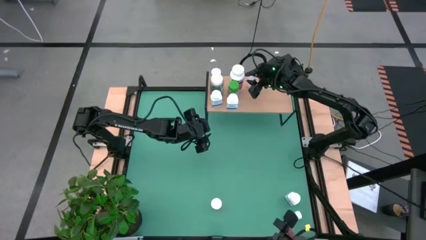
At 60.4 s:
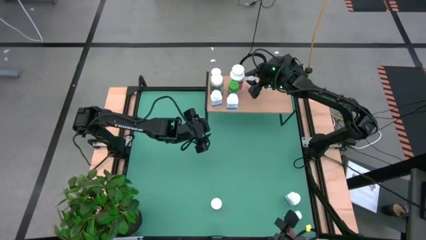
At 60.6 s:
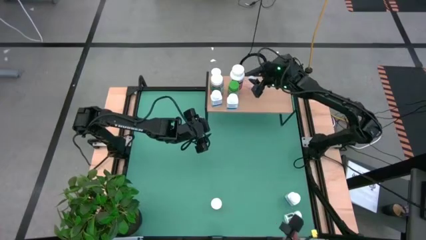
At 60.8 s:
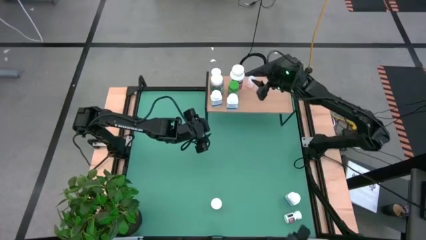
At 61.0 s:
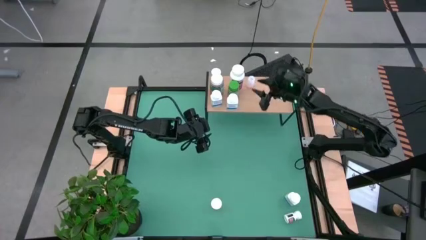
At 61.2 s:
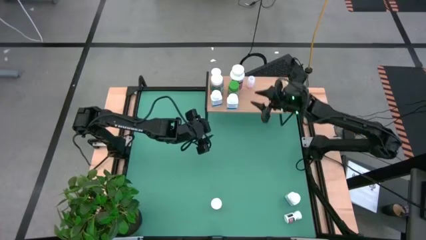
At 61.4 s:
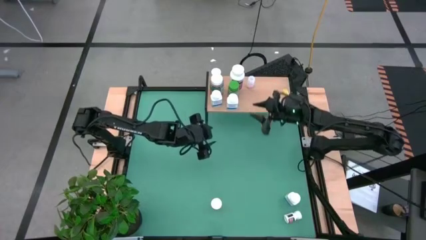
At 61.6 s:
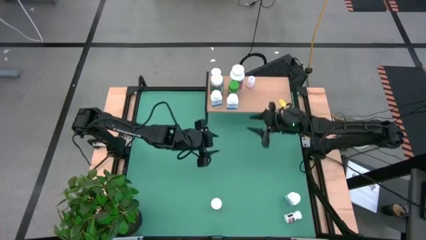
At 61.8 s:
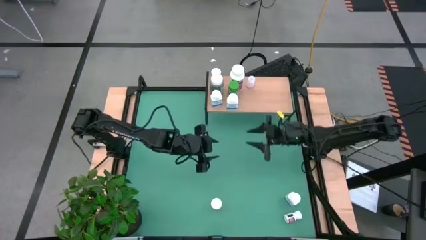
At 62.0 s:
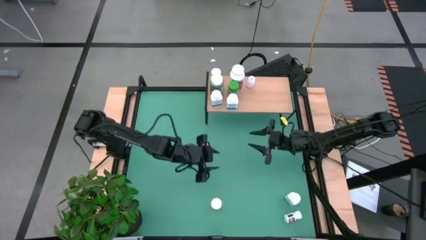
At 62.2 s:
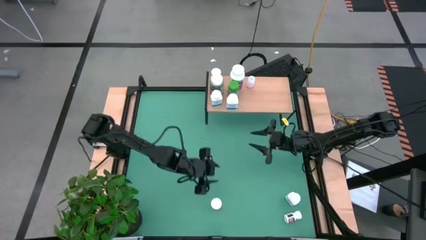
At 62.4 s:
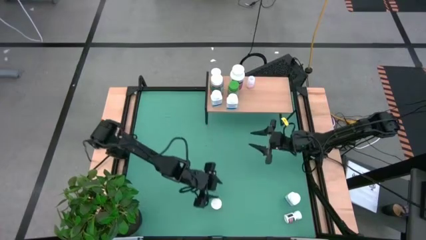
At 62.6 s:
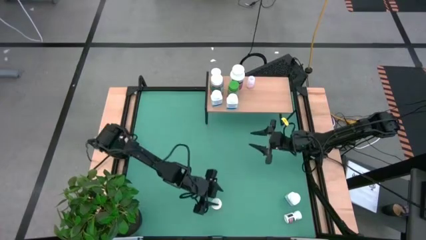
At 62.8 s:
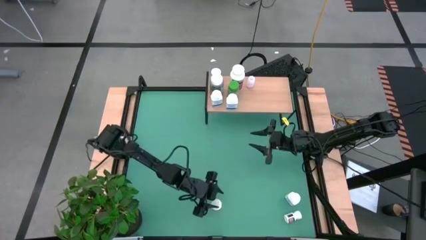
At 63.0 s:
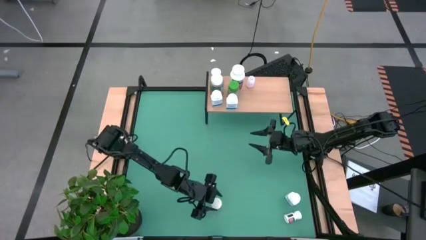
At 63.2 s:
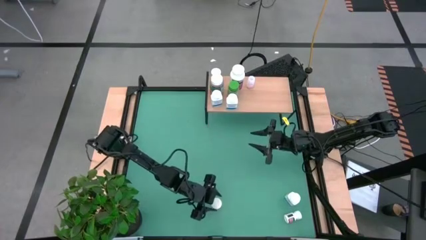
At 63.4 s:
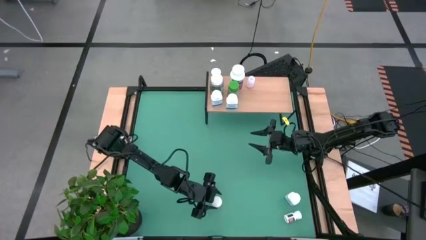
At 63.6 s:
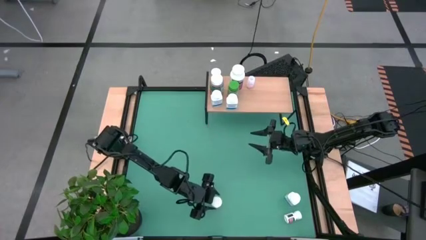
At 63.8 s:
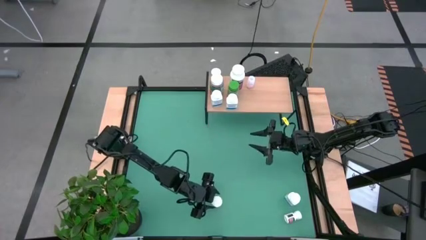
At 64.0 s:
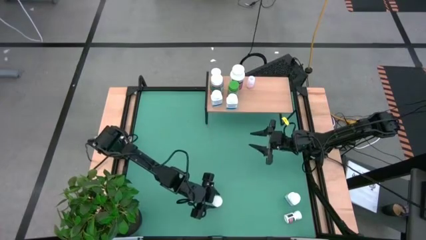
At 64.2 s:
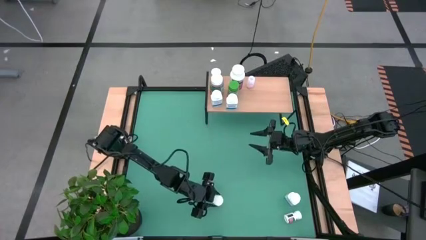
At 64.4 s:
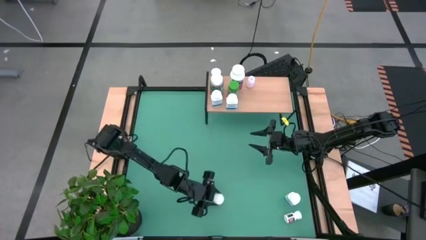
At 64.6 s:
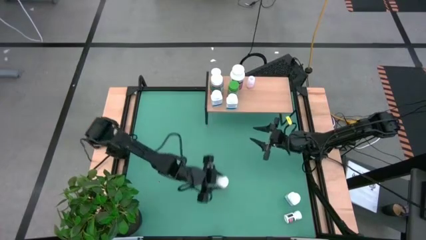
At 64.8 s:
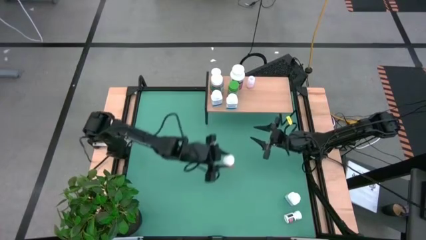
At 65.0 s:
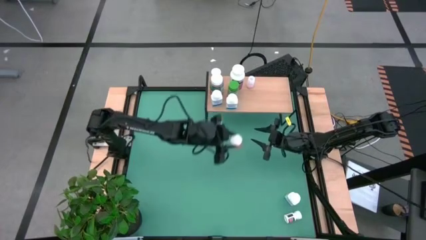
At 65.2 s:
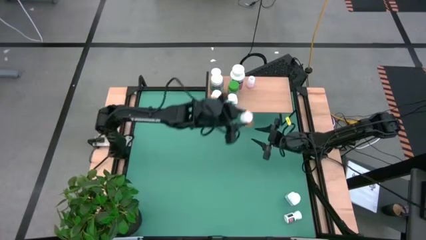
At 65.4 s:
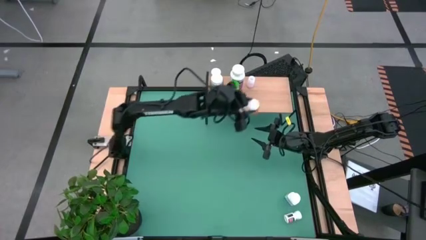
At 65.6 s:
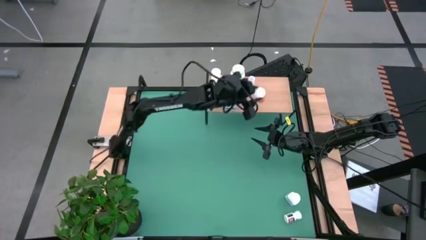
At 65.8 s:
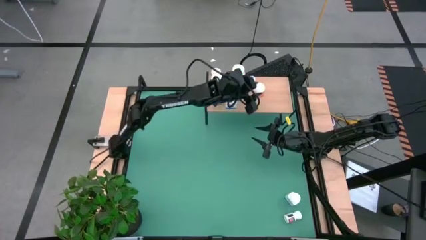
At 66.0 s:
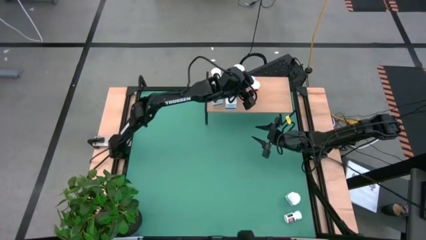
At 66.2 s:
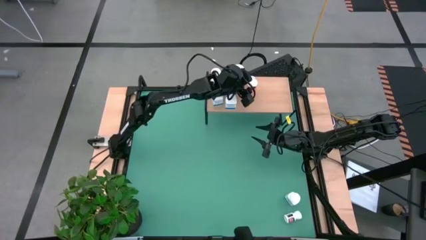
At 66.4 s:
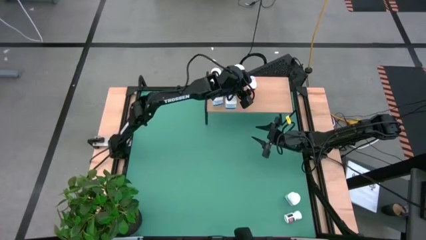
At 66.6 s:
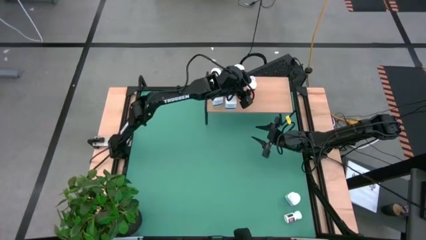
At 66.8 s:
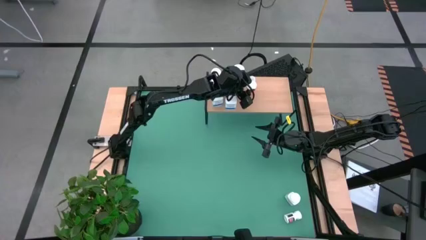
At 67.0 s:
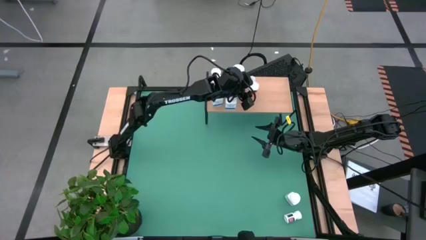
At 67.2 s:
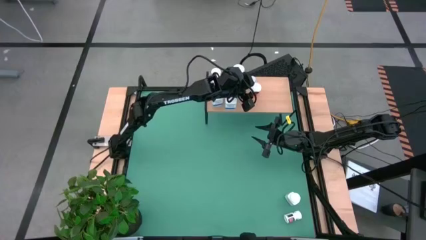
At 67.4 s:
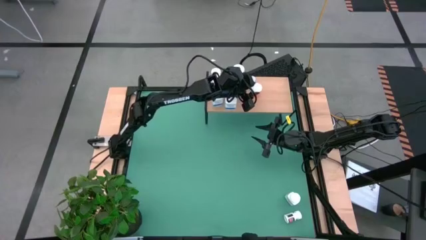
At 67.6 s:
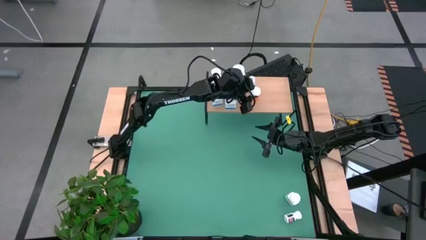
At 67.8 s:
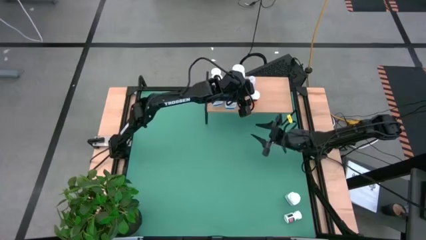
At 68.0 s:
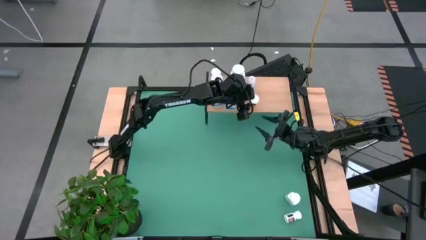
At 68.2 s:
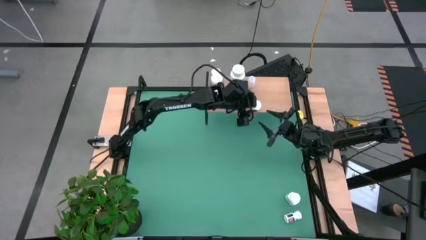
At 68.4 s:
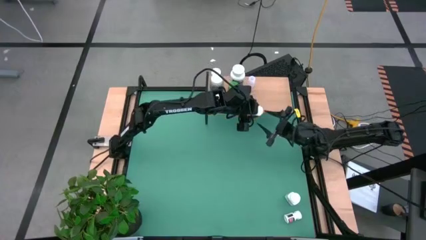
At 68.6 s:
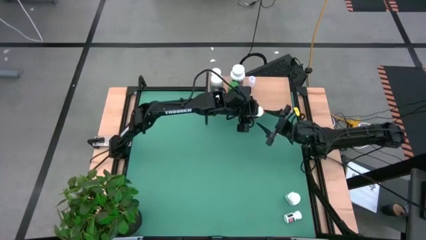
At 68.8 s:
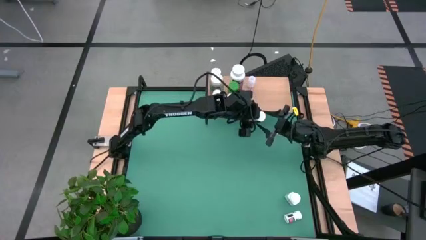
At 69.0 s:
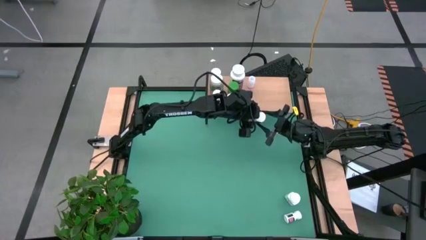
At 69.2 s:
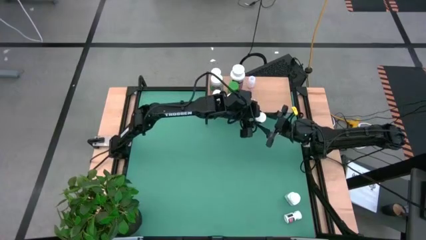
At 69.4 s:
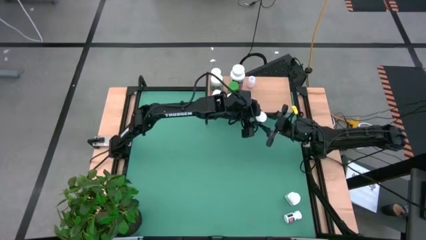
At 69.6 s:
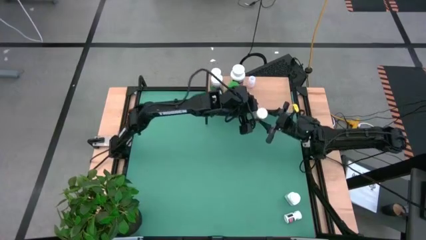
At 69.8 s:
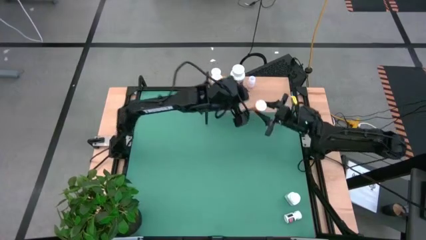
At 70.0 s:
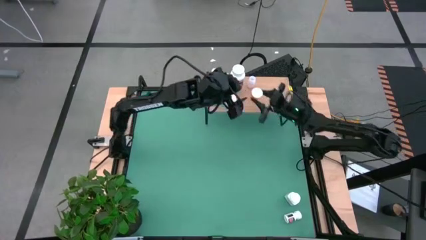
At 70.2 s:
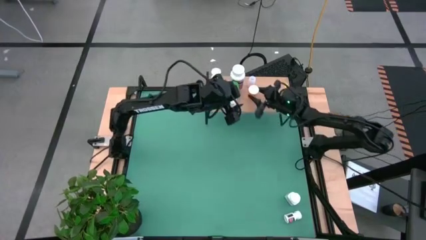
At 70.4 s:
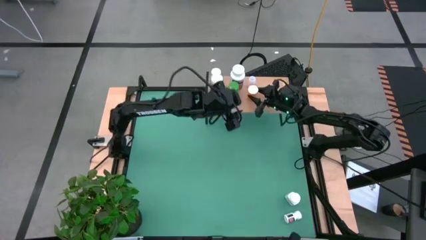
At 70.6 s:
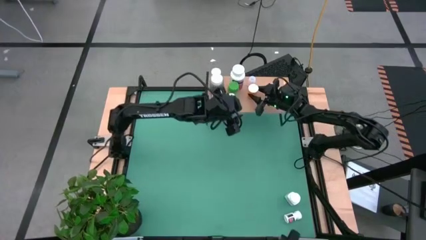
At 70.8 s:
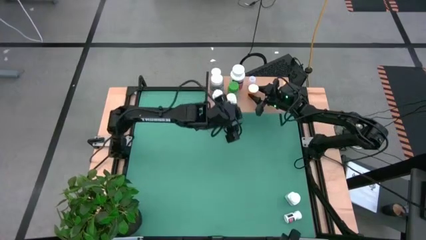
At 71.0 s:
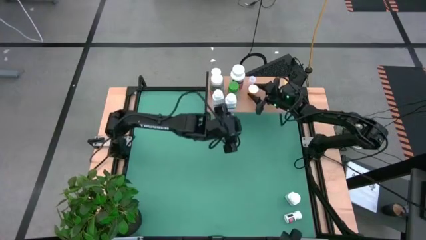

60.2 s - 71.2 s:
Task: Pick and place medicine bottles onto shelf by color
Put the orange pill bottle on the shelf
